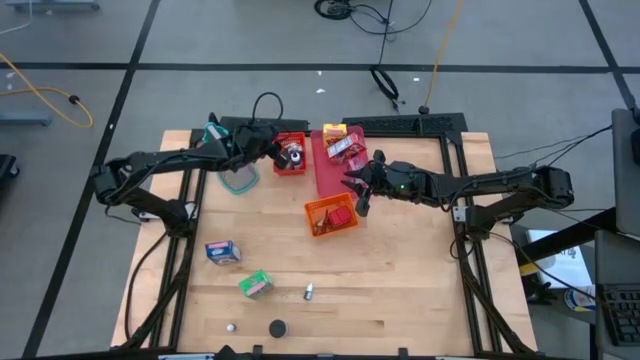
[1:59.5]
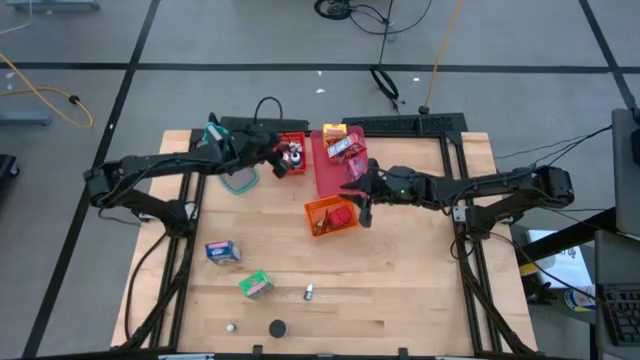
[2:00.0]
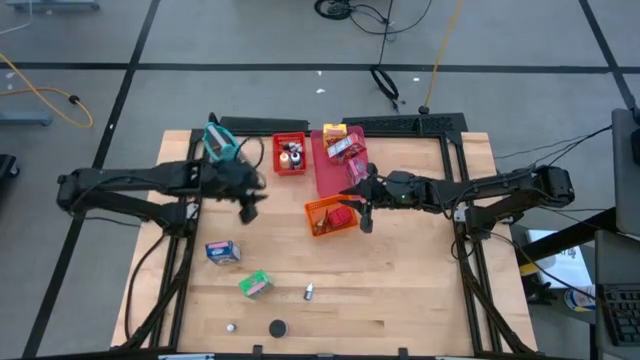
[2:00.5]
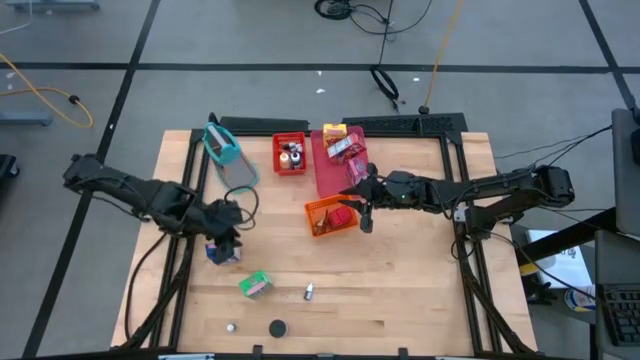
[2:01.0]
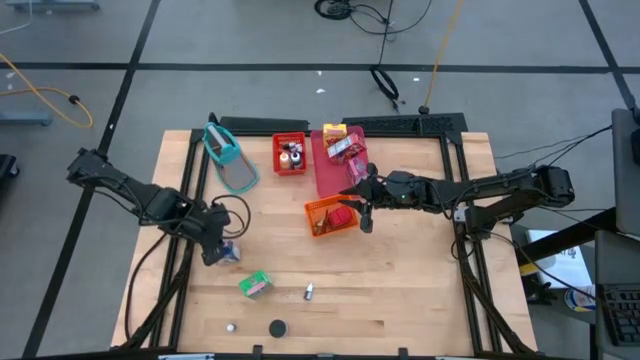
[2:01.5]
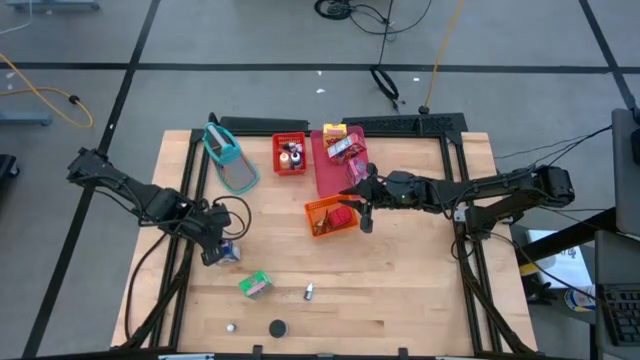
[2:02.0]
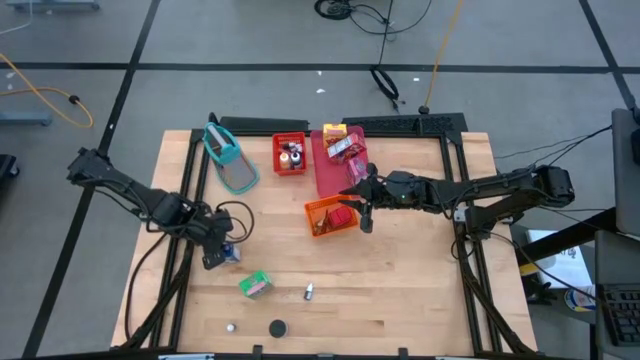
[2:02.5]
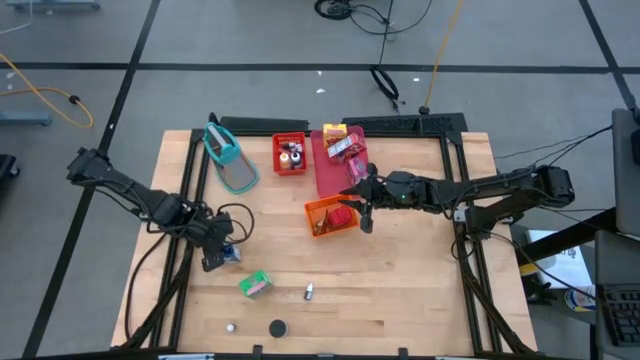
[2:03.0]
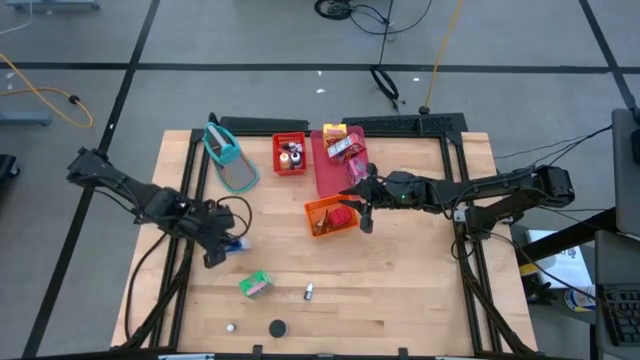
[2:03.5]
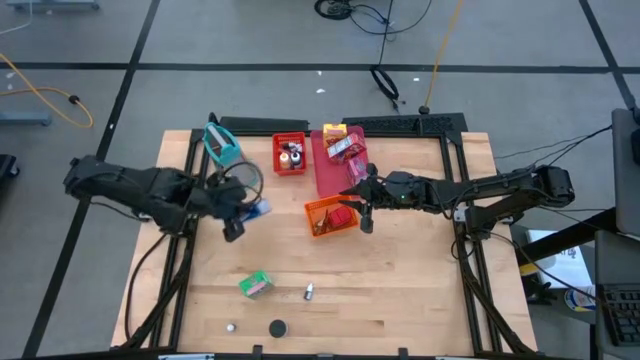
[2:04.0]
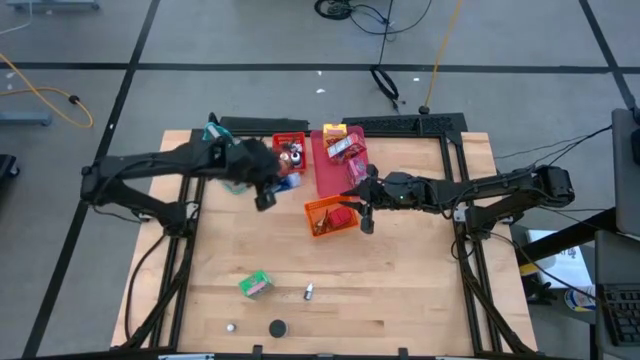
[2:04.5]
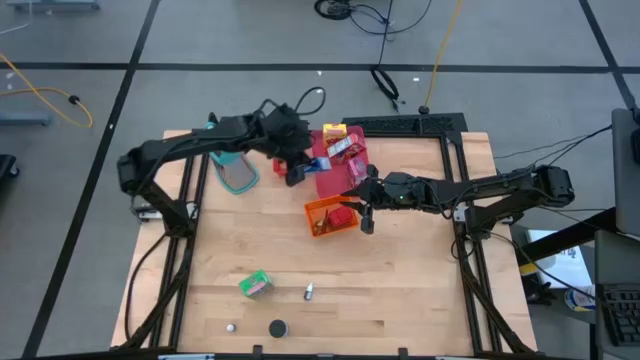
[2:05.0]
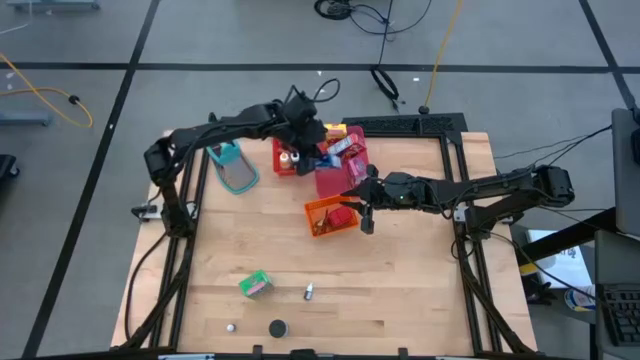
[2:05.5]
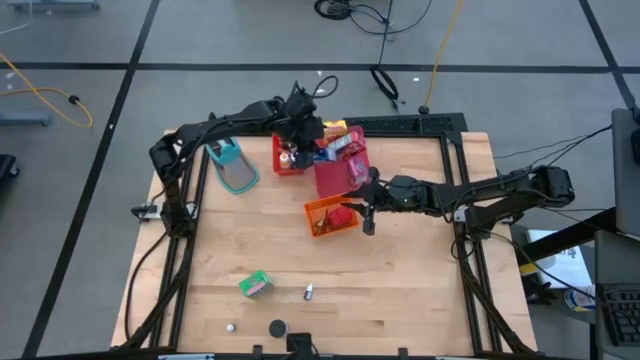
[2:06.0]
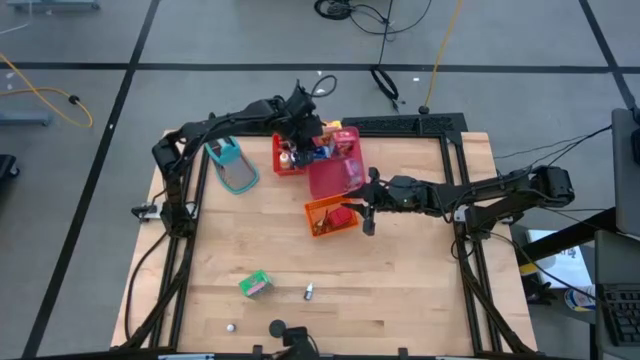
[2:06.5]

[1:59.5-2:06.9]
Task: Pick & Place Kitchen Items
Put the blue cereal box into the pink bin

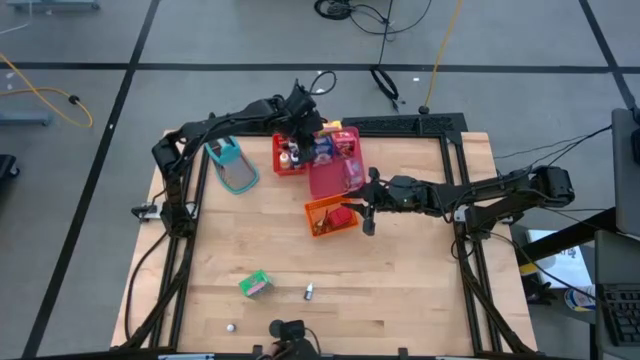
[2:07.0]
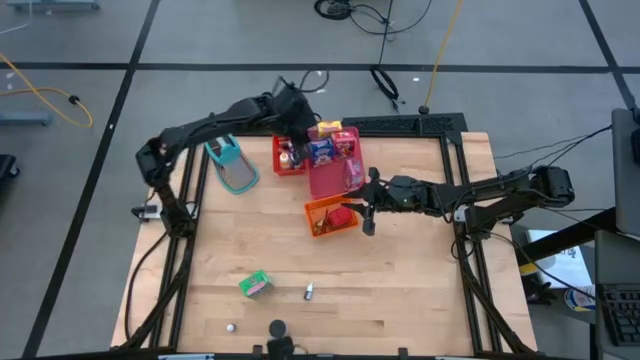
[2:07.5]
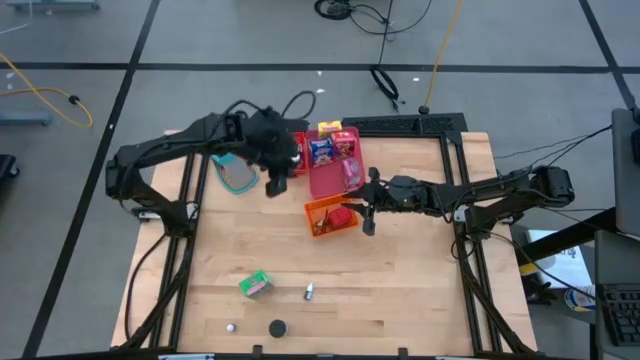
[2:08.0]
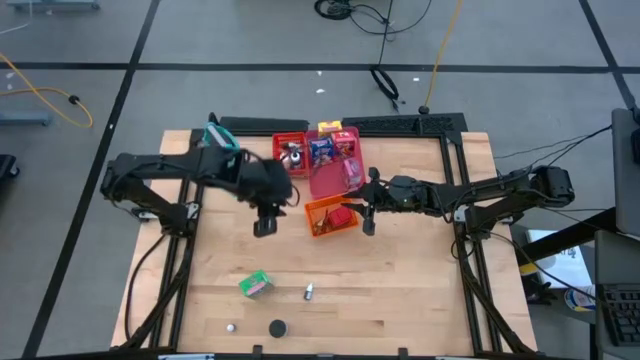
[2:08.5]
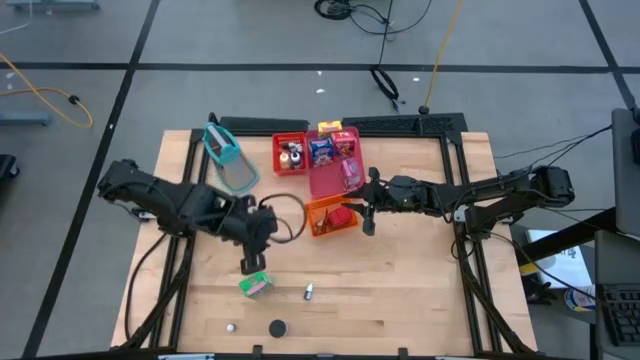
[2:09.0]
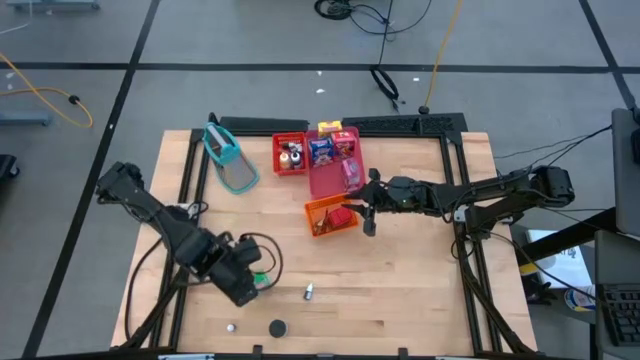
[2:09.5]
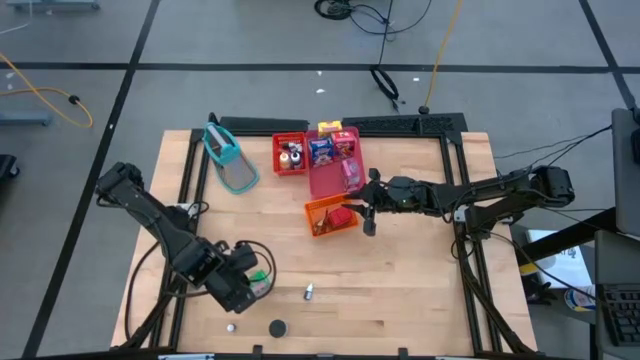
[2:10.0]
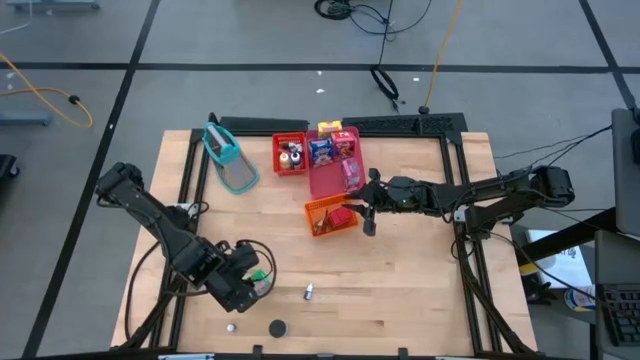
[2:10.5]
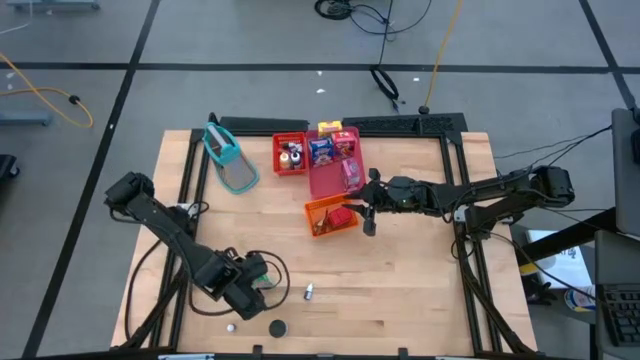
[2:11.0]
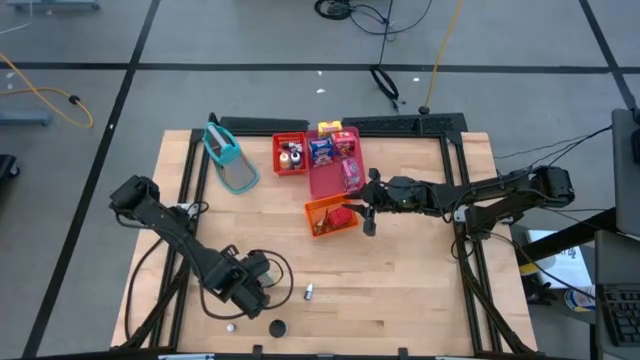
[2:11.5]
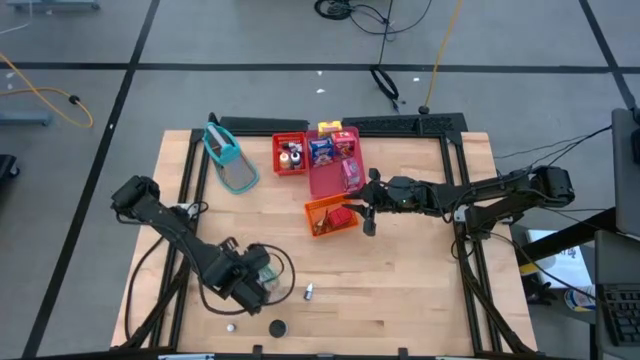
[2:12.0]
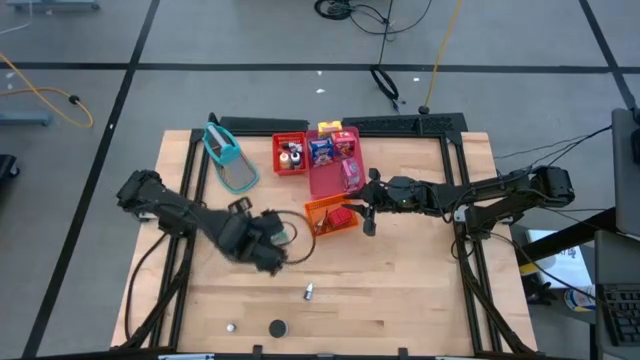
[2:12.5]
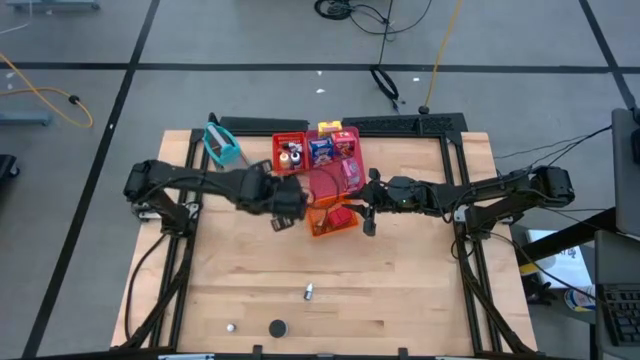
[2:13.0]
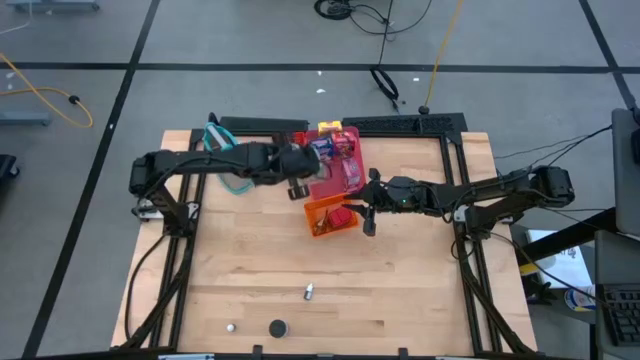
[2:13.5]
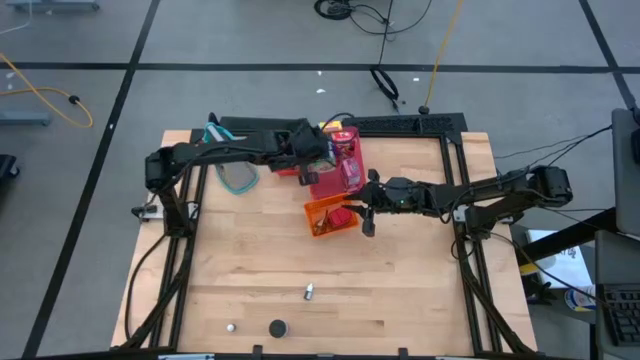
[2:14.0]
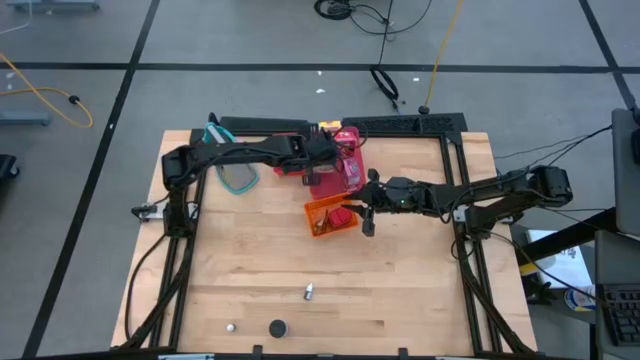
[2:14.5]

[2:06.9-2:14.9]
Put the green cereal box into the pink bin

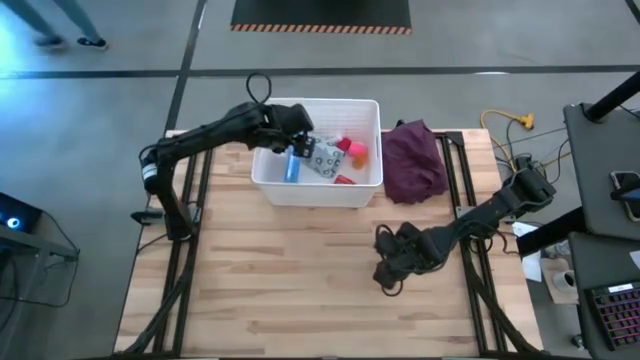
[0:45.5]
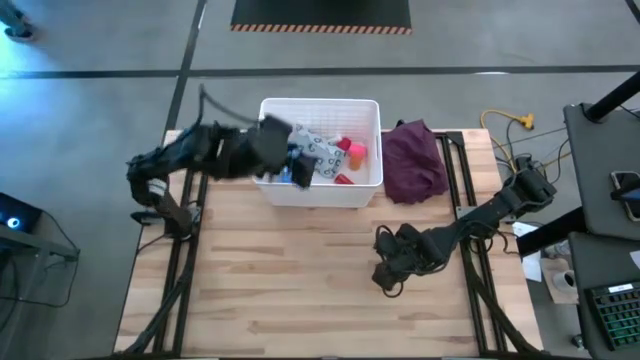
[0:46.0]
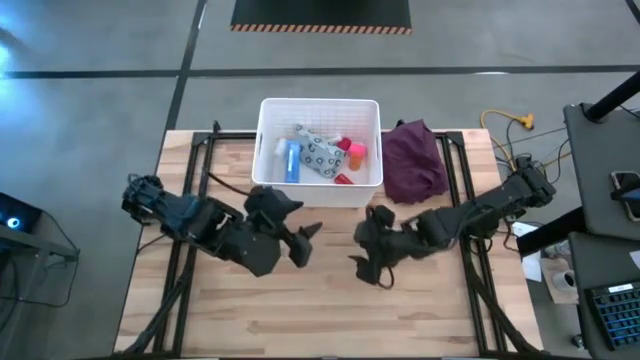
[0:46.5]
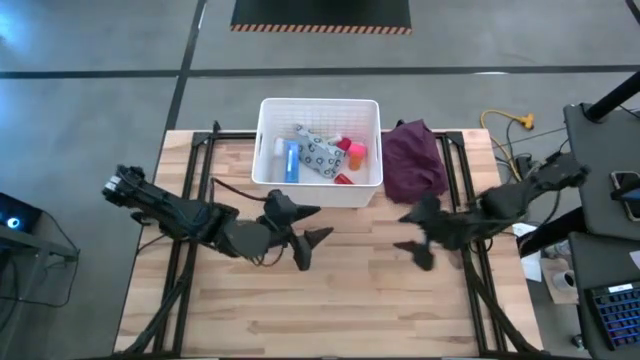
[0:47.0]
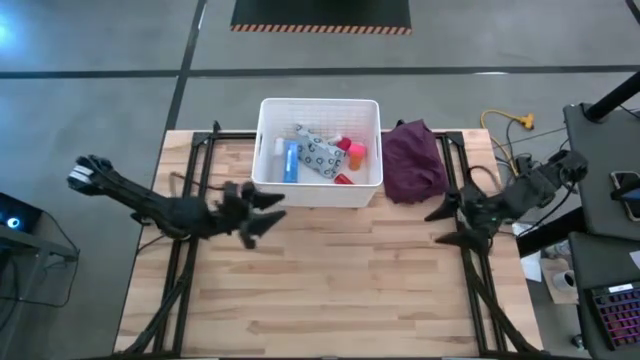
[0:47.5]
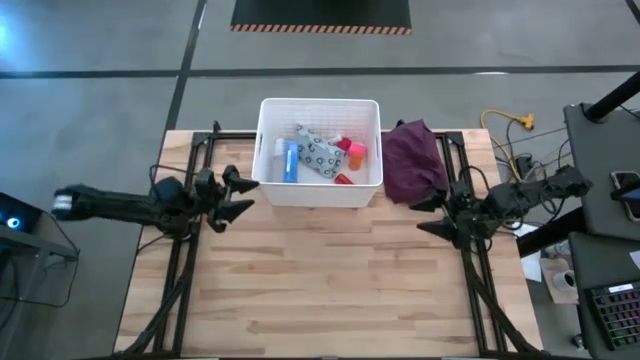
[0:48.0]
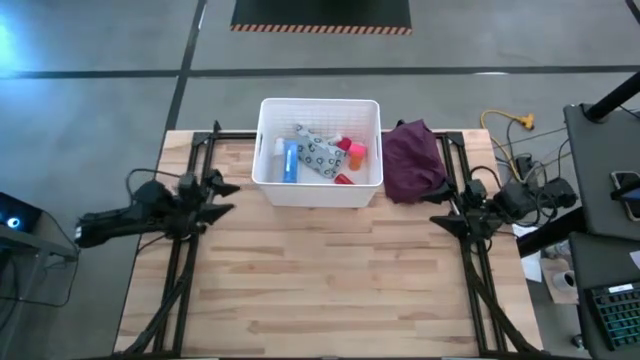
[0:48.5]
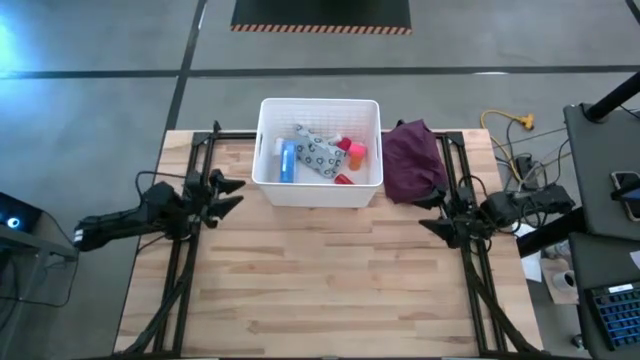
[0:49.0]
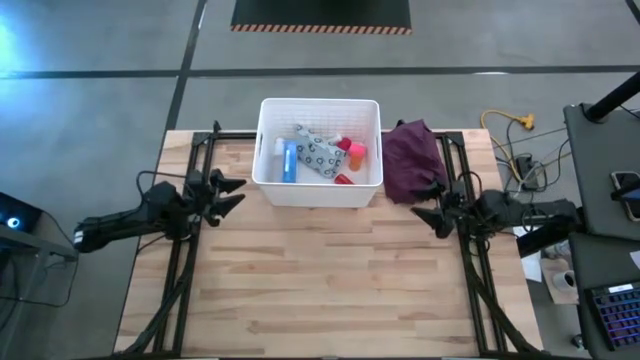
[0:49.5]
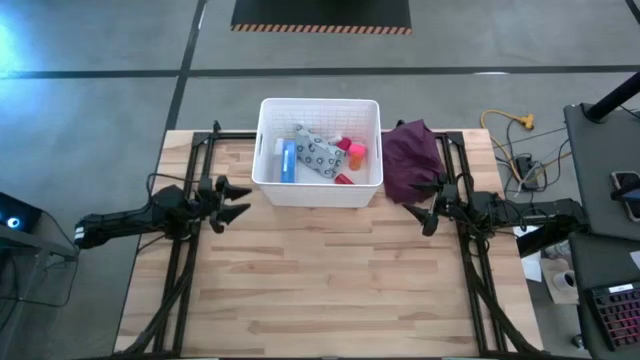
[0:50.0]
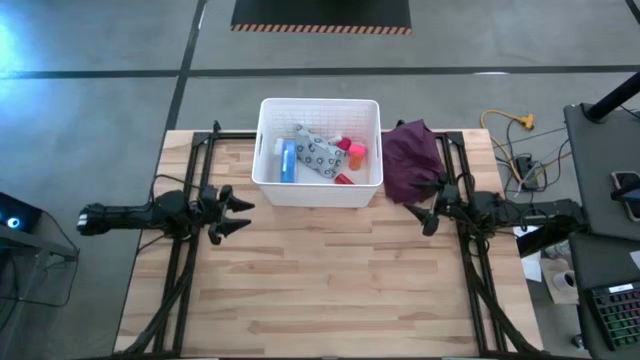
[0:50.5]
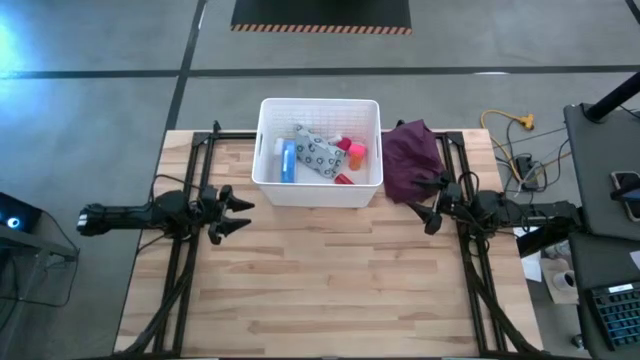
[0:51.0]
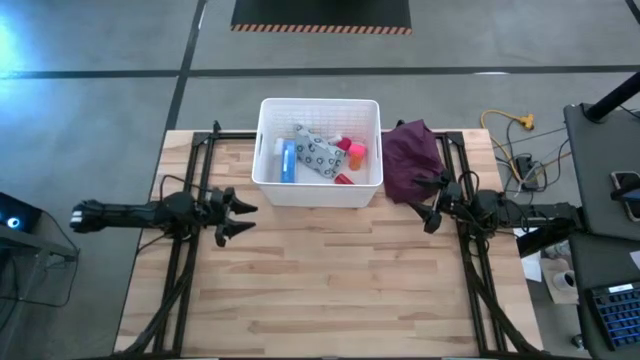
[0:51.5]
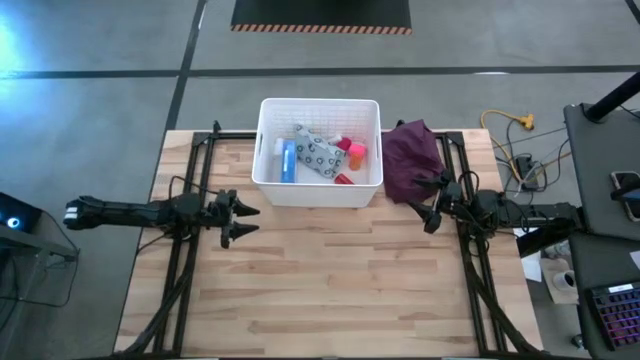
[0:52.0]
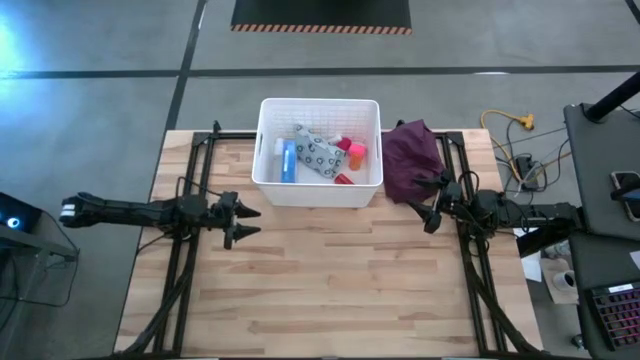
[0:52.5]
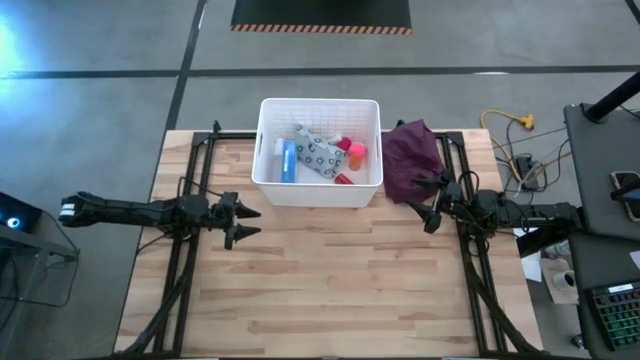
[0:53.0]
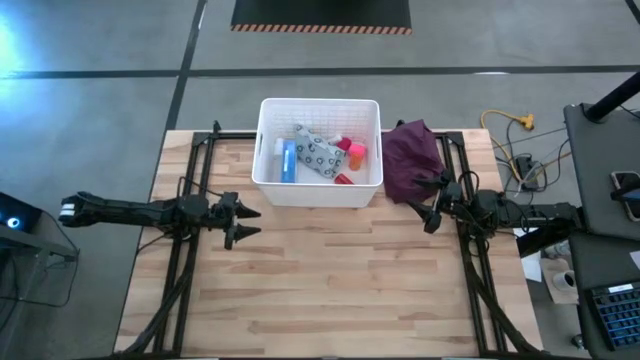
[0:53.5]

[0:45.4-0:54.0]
Task: Pick & place medical supplies in basket/bin
Return to Home Position
